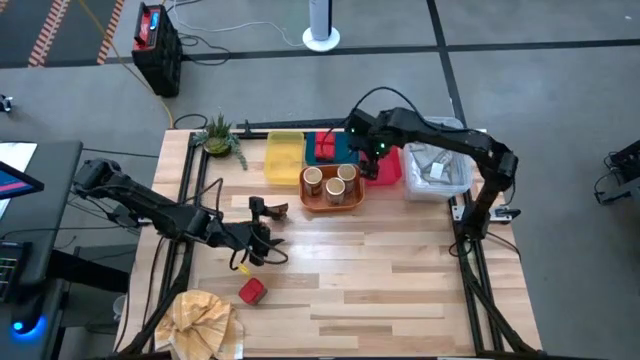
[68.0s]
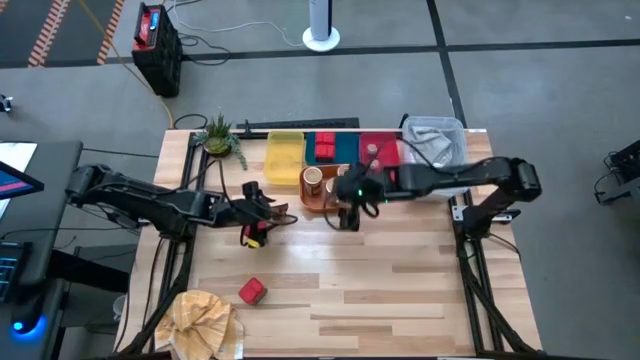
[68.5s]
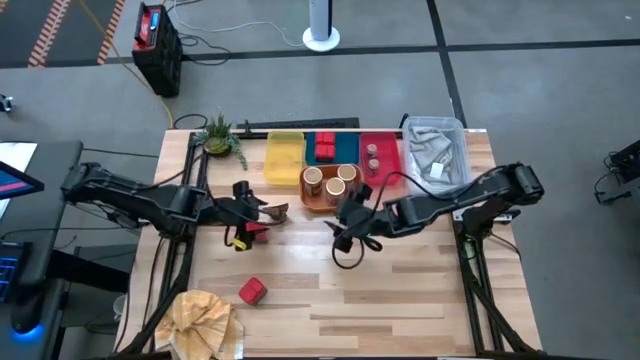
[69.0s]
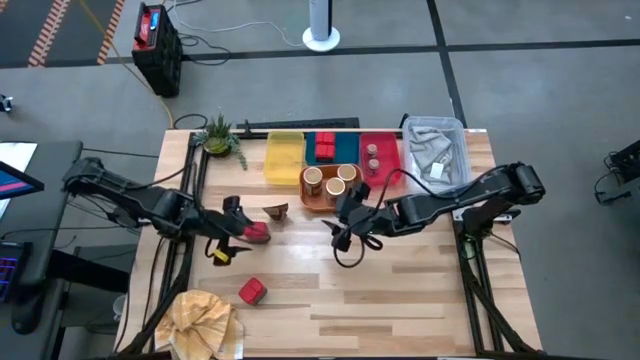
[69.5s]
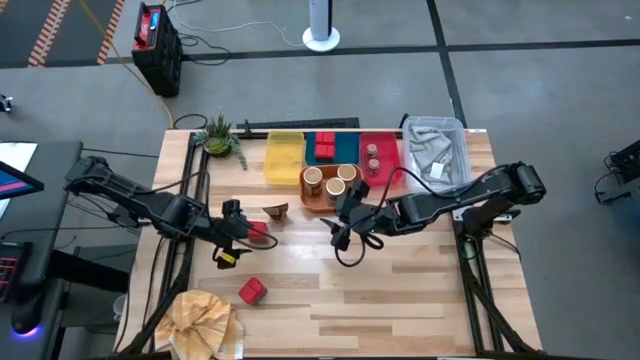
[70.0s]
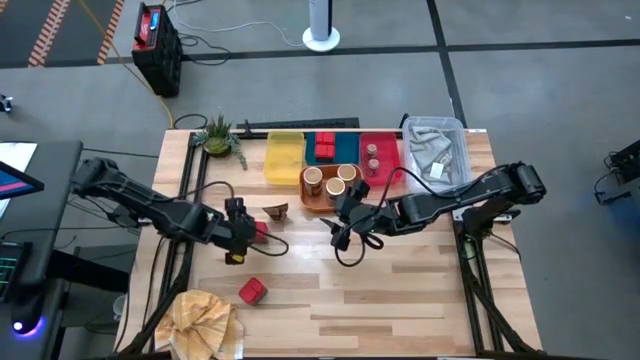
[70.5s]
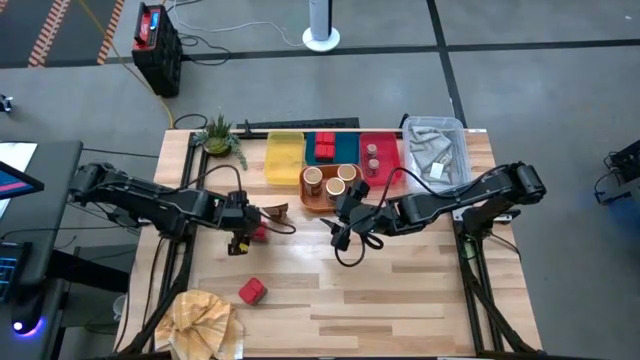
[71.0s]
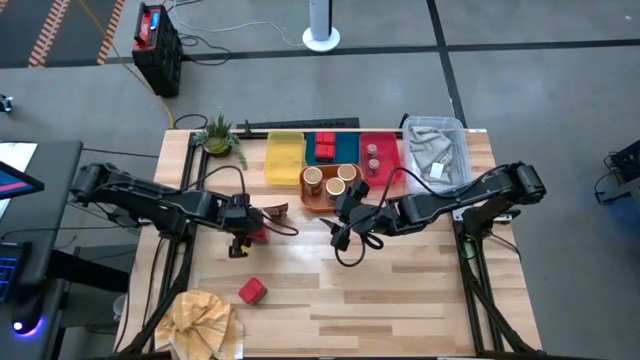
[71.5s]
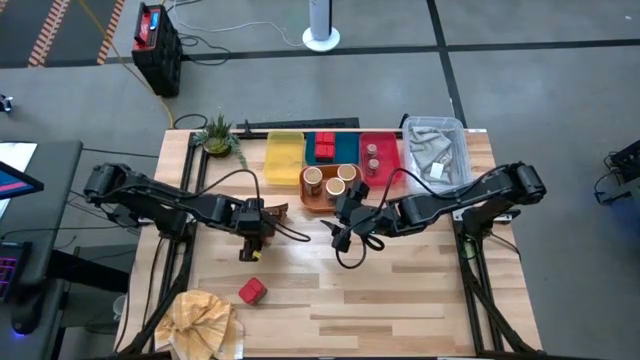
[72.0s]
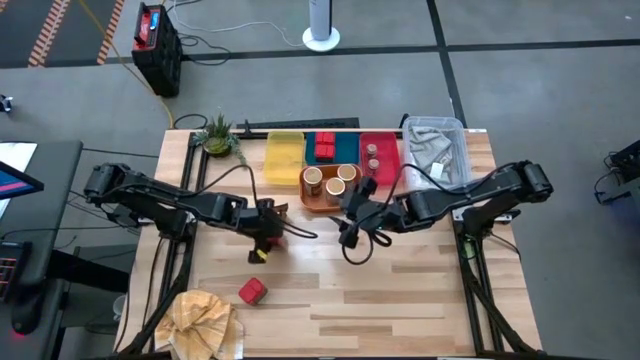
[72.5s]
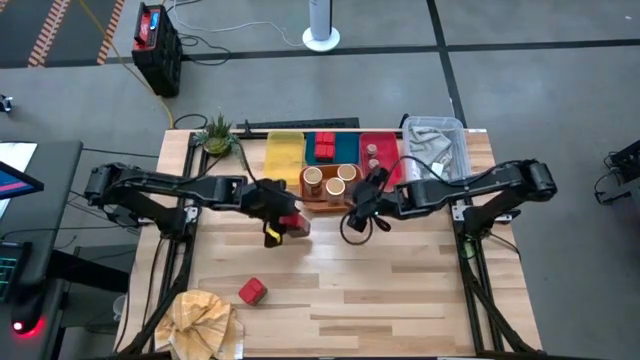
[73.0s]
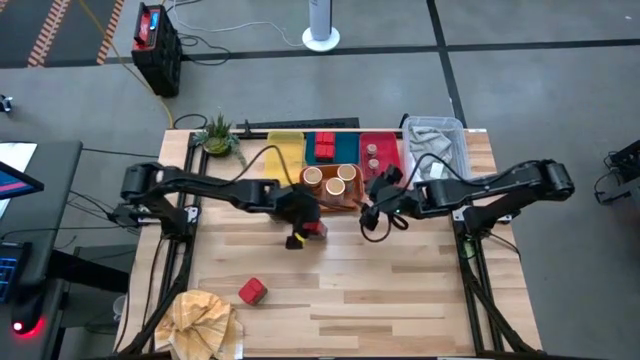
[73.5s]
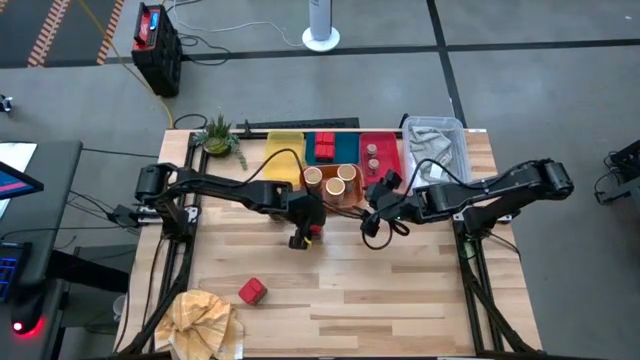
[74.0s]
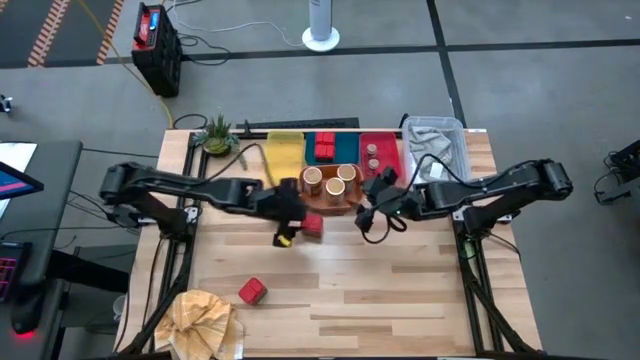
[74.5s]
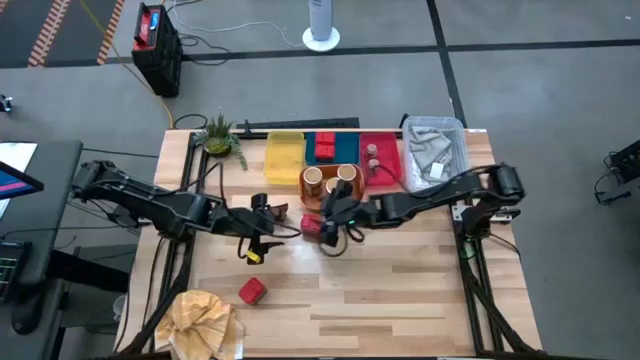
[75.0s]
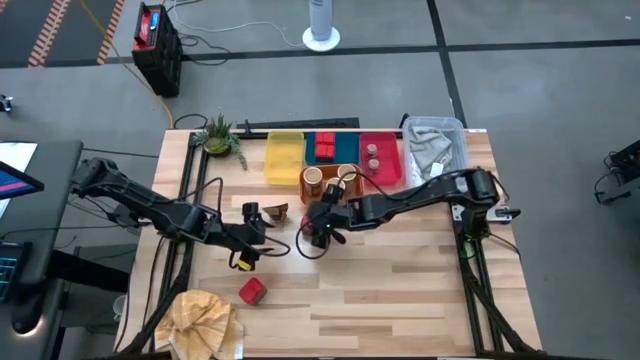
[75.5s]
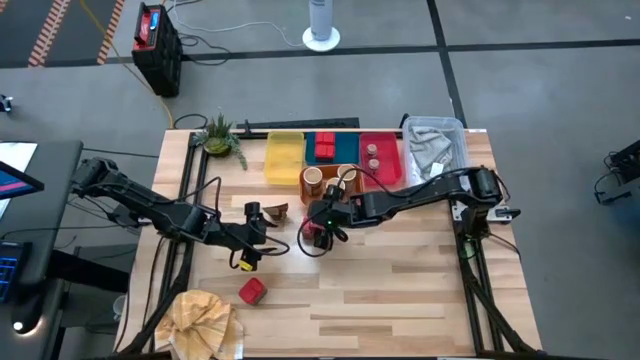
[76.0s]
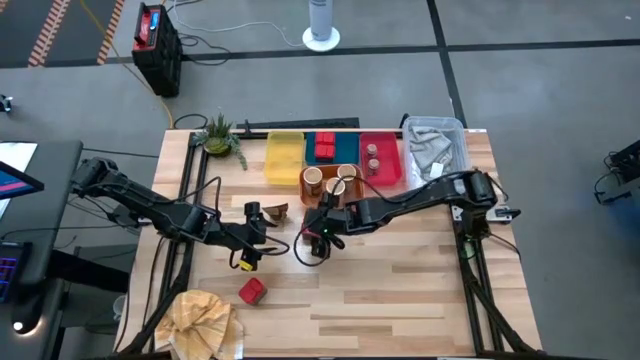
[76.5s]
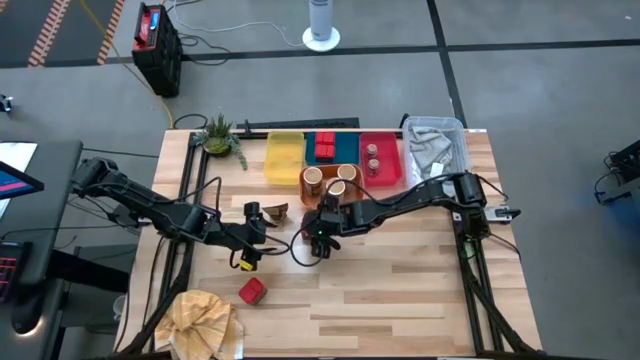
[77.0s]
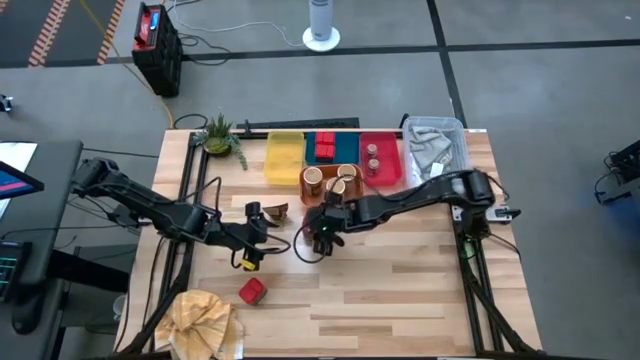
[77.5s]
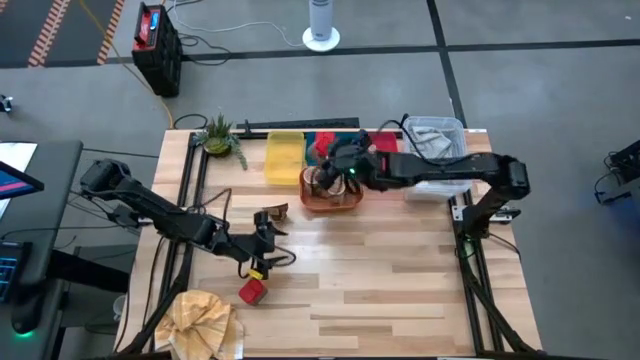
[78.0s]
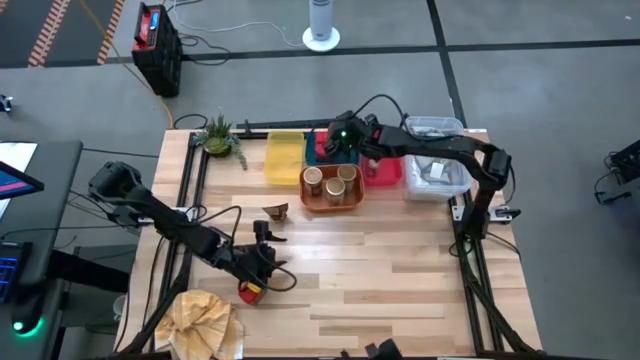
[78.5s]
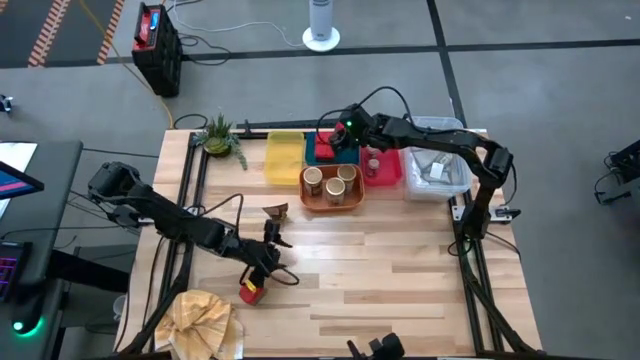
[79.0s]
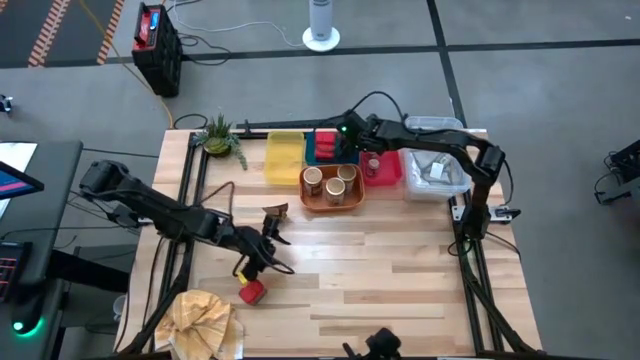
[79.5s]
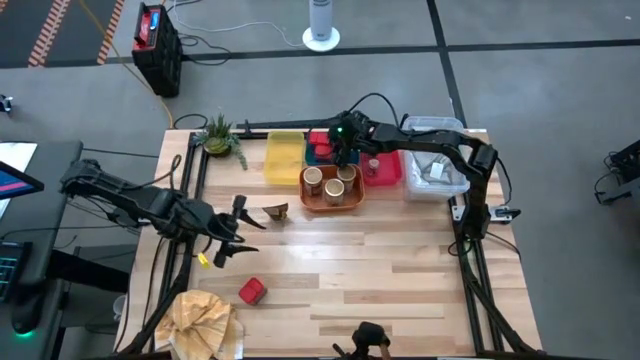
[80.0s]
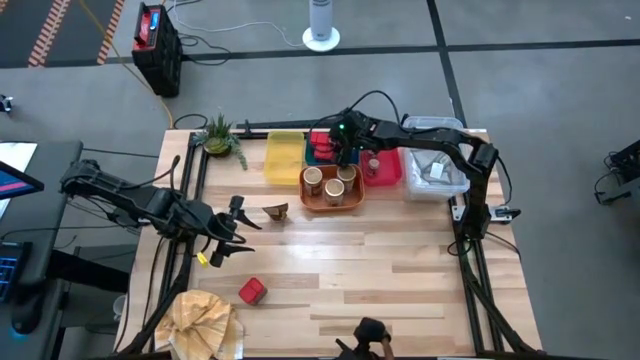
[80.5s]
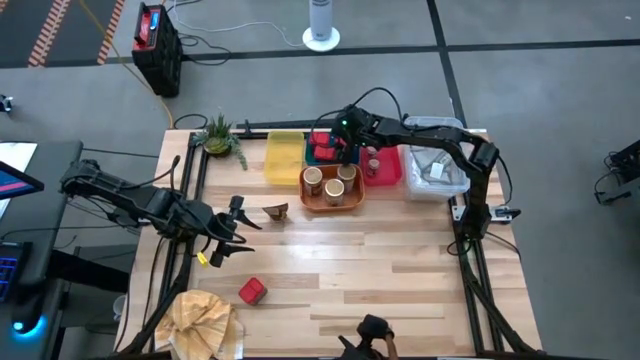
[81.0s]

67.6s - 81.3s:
Task: Sort spices by type
Put the red seasoning can into the blue bin

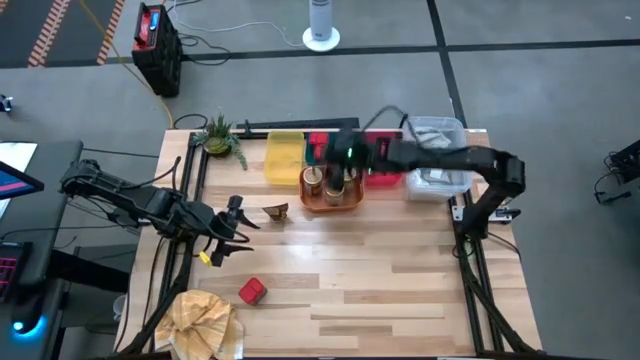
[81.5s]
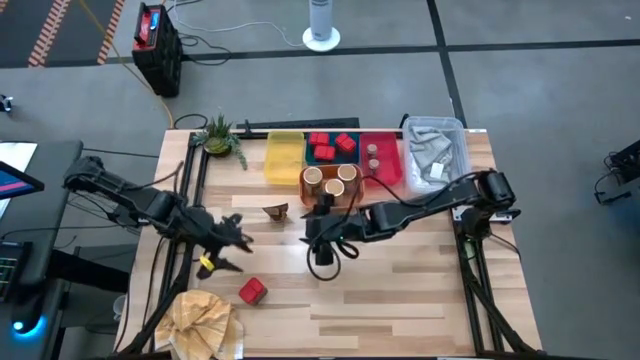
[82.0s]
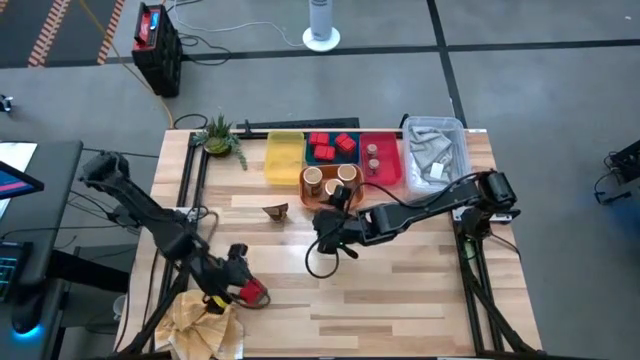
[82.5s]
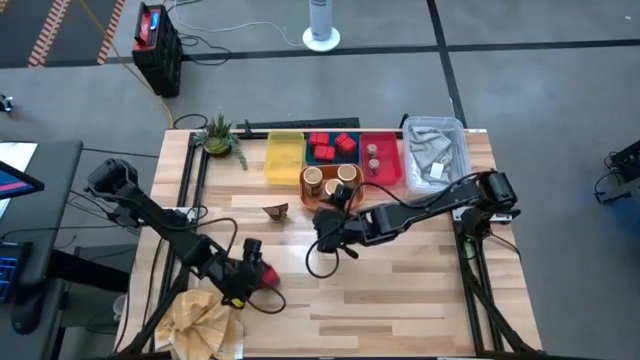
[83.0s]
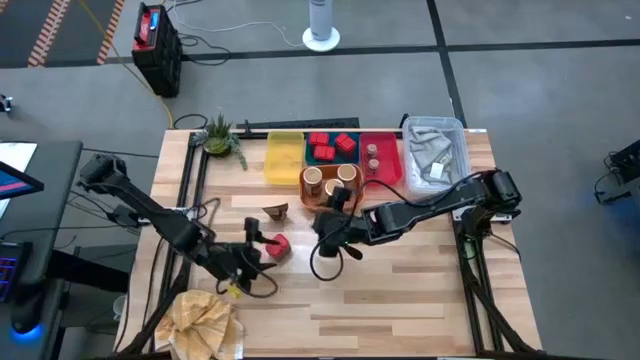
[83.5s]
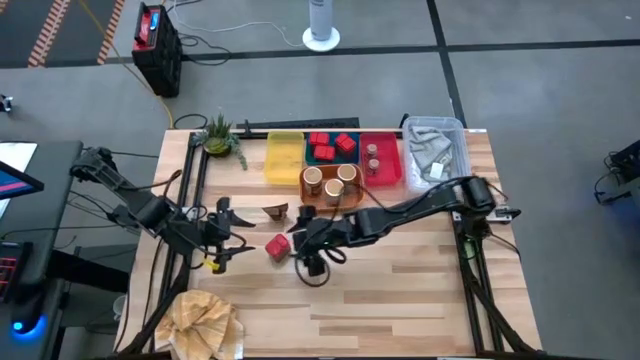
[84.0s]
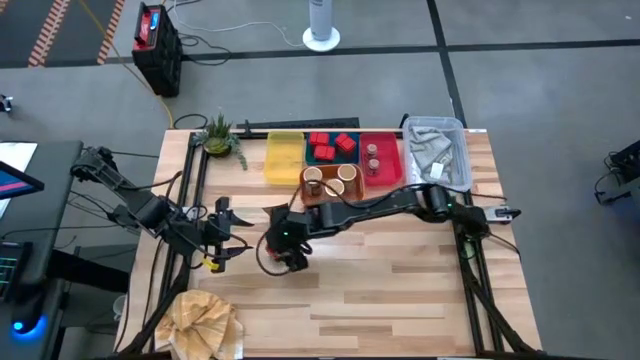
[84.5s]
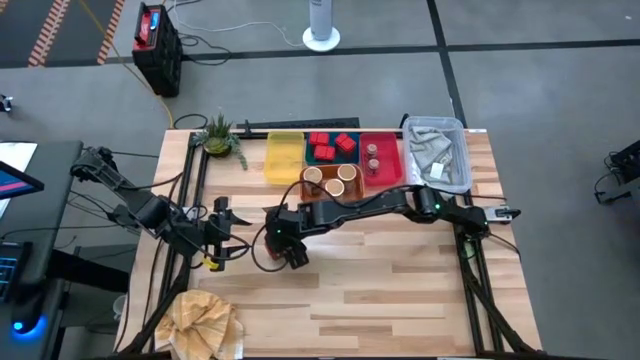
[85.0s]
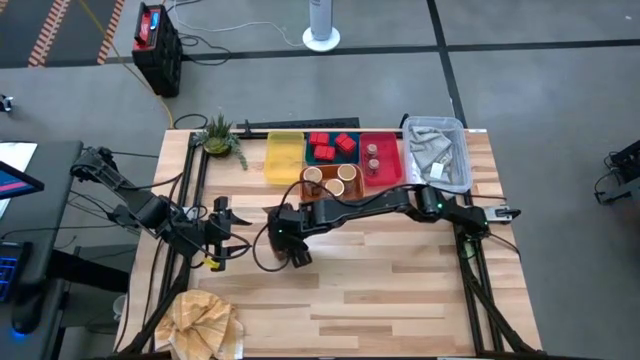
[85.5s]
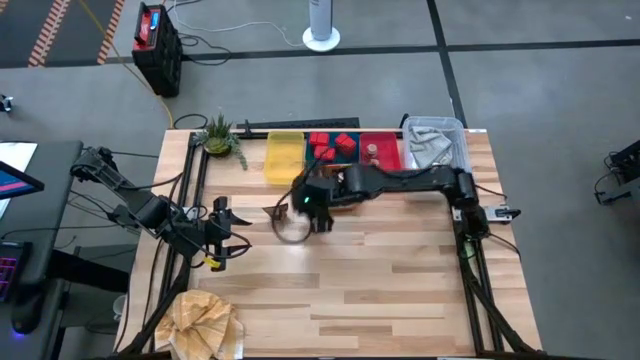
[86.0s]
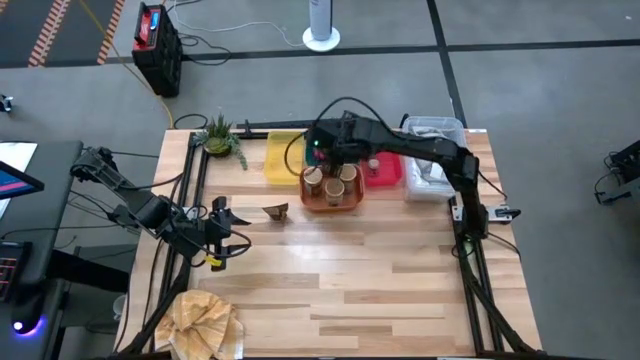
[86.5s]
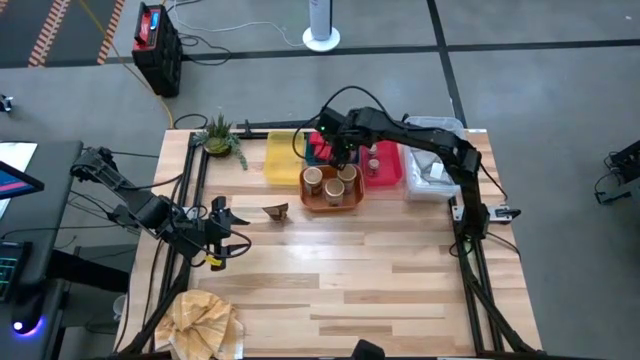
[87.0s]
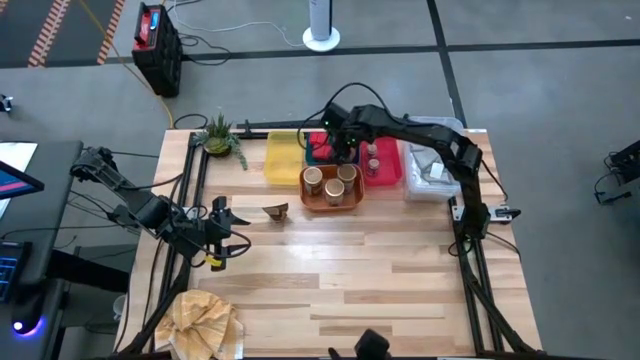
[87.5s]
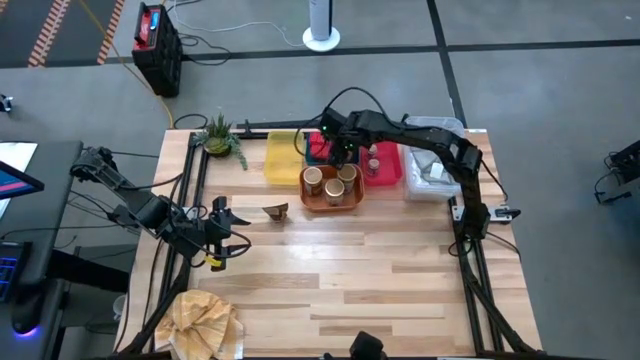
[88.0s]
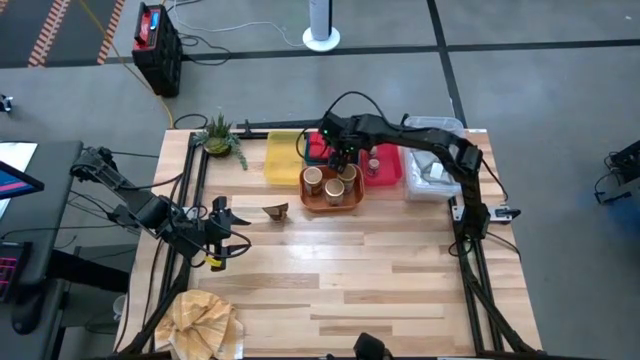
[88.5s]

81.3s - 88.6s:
Put the red seasoning can into the blue bin
